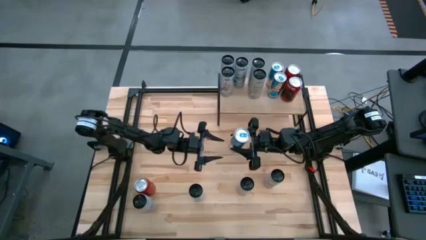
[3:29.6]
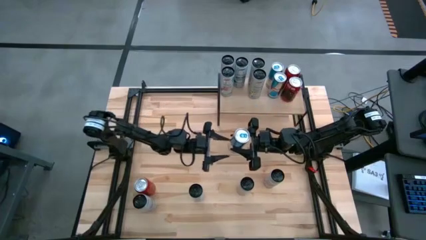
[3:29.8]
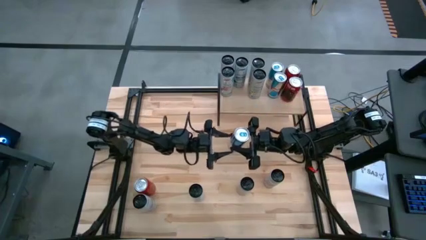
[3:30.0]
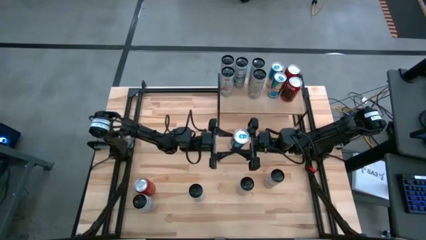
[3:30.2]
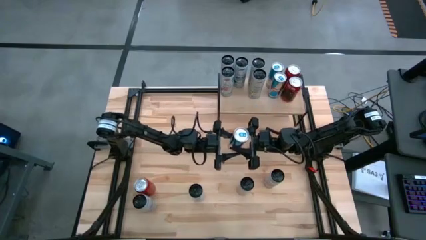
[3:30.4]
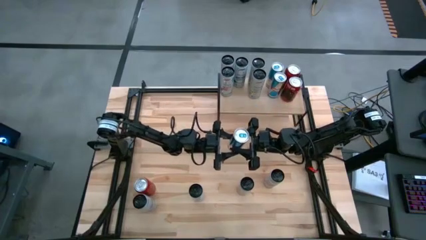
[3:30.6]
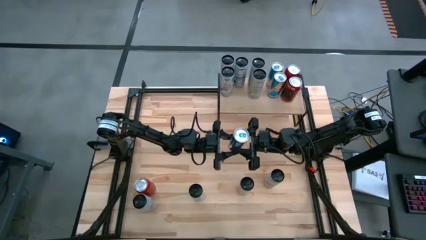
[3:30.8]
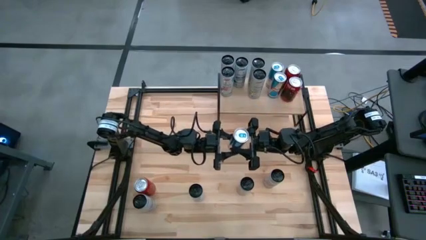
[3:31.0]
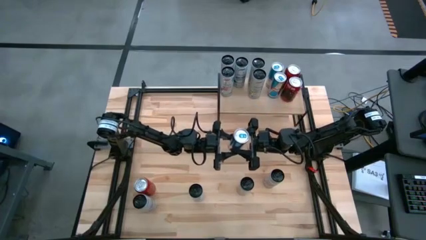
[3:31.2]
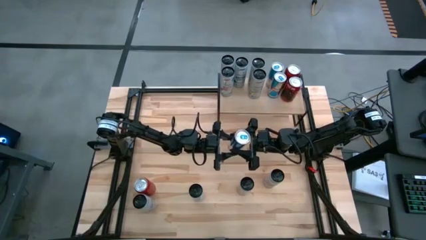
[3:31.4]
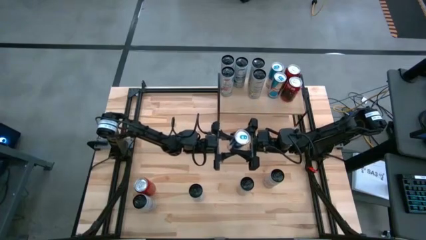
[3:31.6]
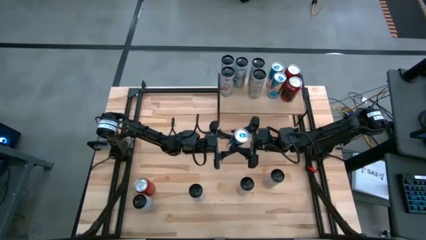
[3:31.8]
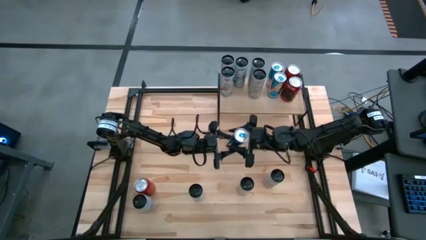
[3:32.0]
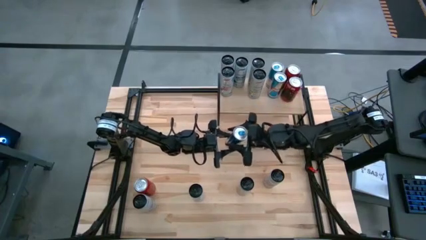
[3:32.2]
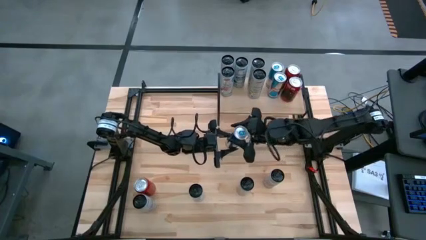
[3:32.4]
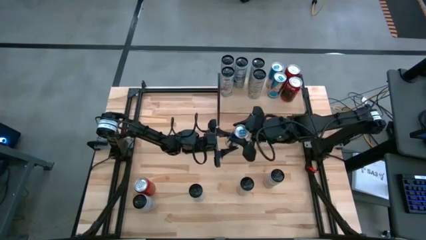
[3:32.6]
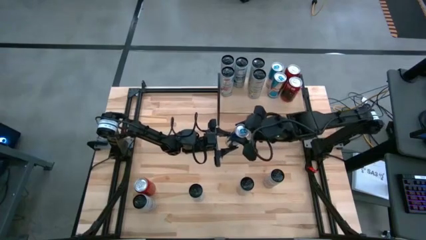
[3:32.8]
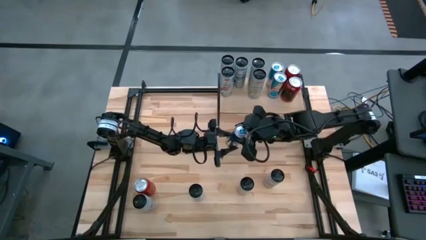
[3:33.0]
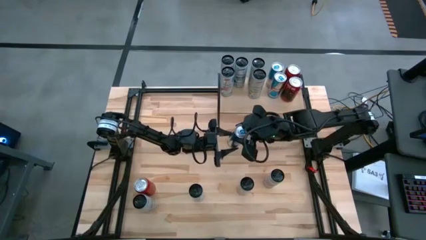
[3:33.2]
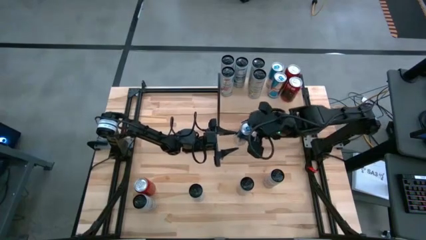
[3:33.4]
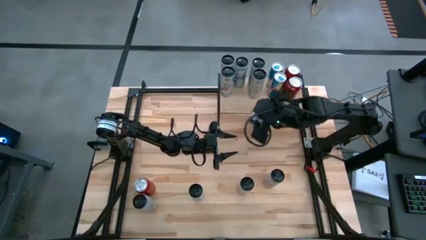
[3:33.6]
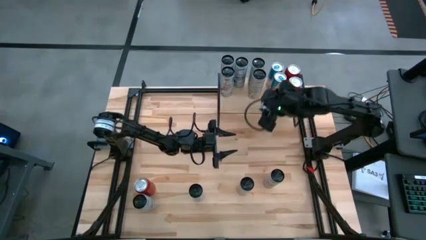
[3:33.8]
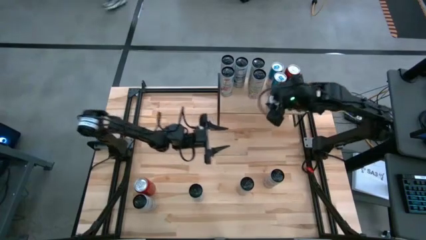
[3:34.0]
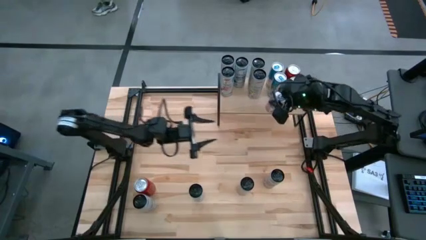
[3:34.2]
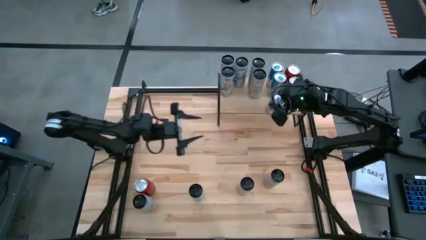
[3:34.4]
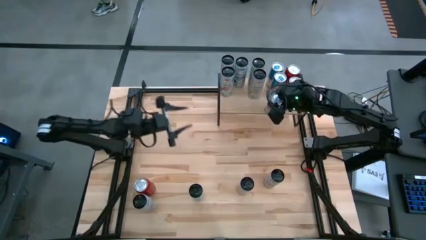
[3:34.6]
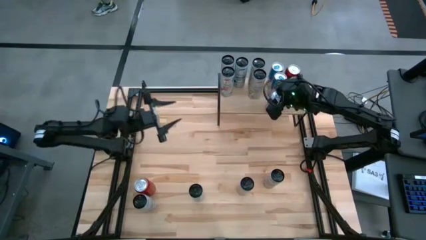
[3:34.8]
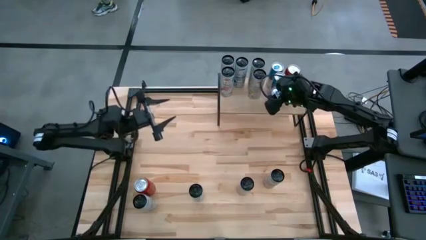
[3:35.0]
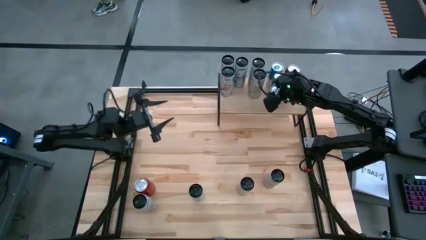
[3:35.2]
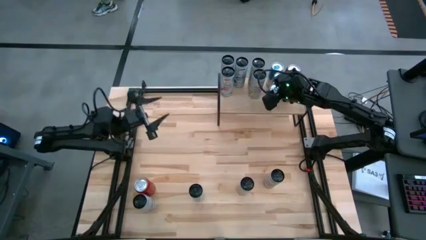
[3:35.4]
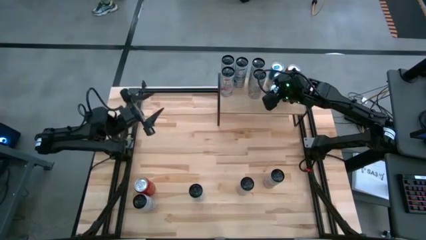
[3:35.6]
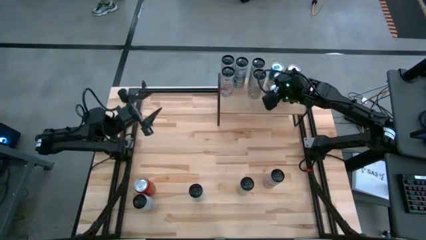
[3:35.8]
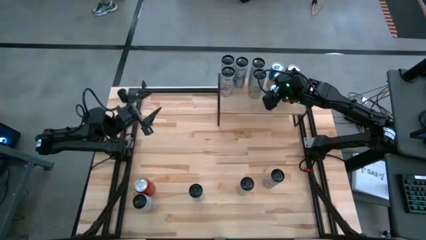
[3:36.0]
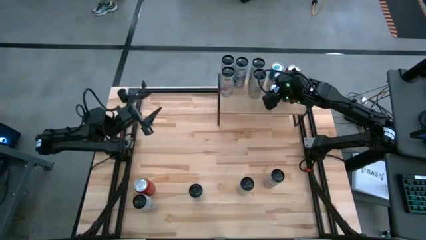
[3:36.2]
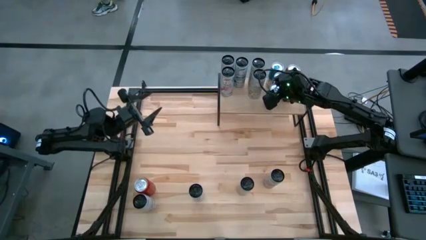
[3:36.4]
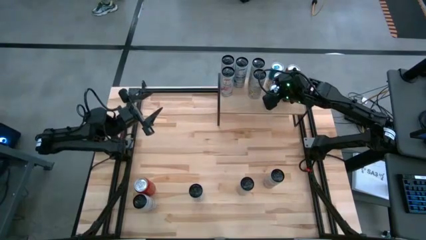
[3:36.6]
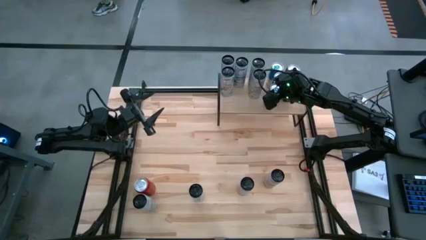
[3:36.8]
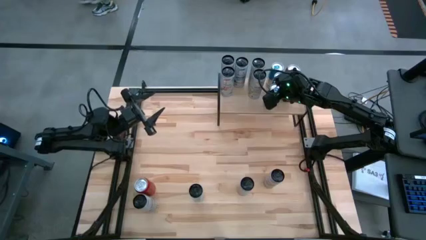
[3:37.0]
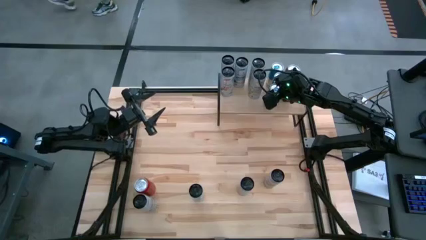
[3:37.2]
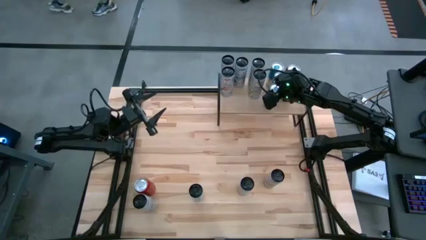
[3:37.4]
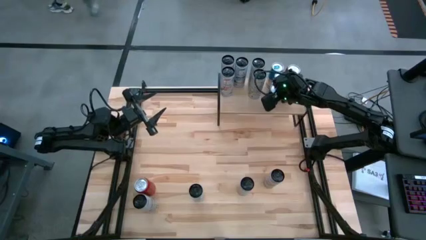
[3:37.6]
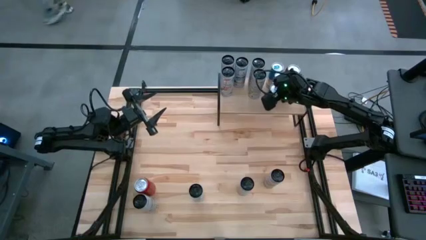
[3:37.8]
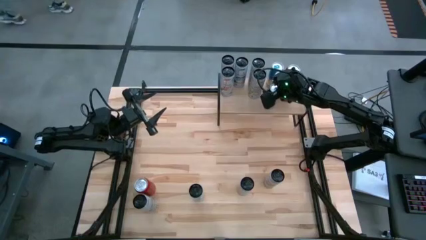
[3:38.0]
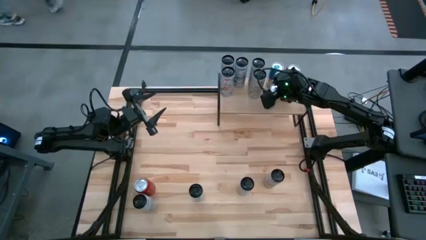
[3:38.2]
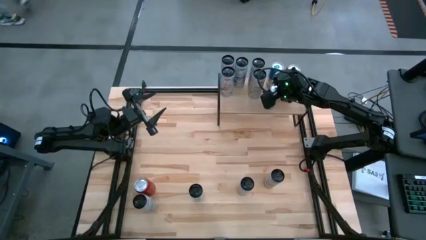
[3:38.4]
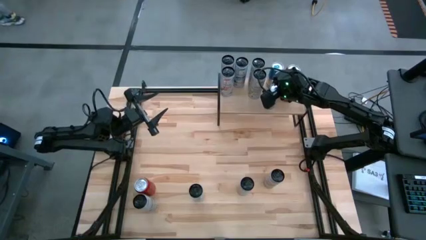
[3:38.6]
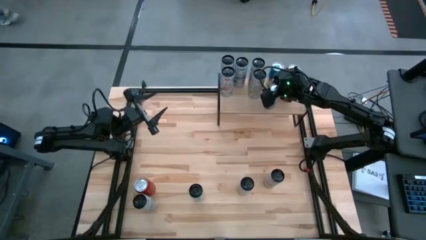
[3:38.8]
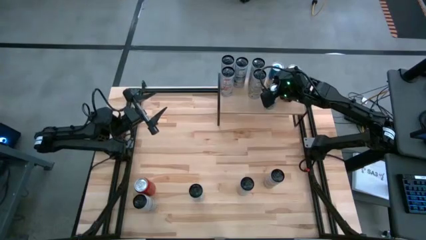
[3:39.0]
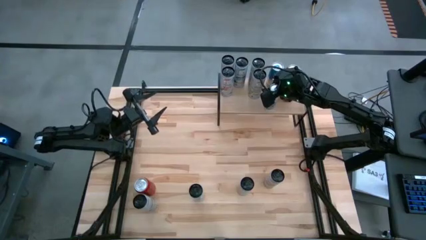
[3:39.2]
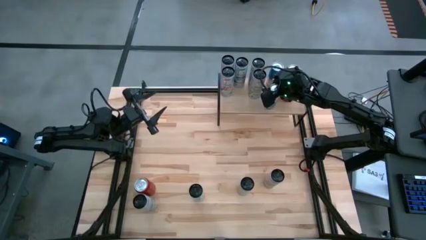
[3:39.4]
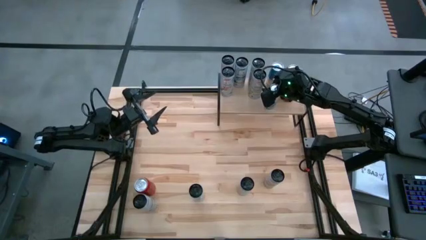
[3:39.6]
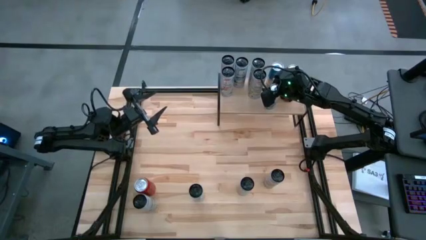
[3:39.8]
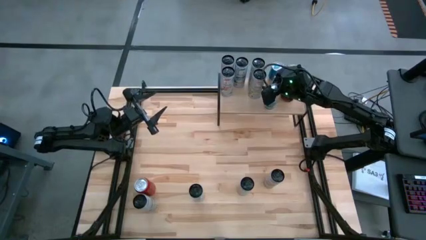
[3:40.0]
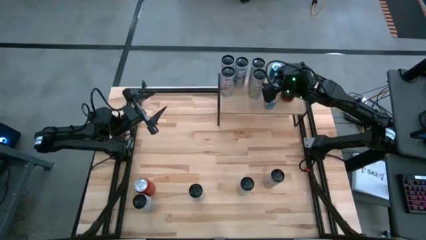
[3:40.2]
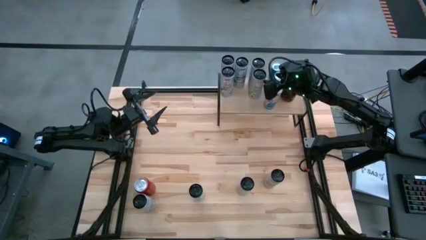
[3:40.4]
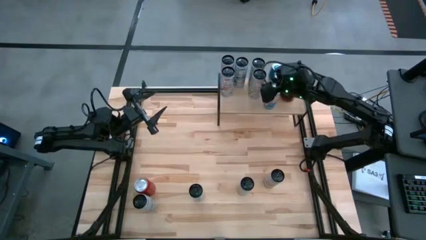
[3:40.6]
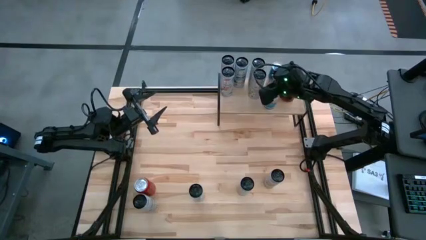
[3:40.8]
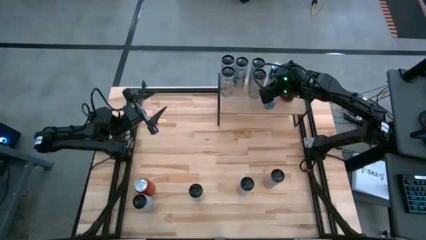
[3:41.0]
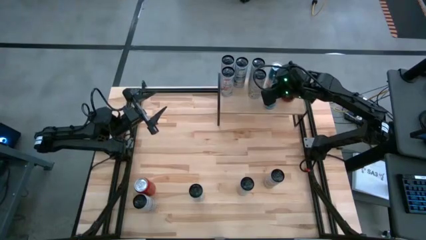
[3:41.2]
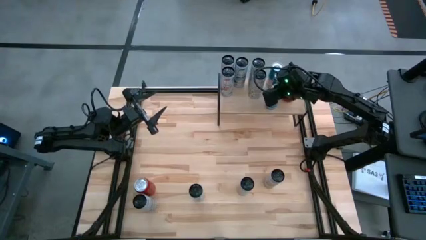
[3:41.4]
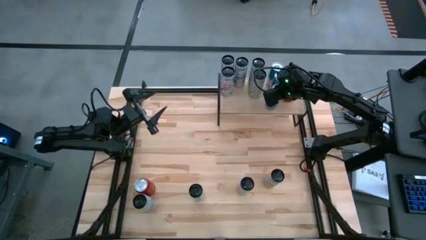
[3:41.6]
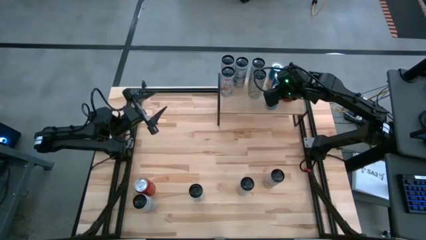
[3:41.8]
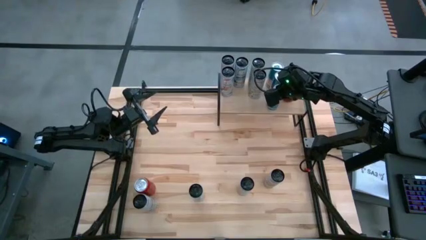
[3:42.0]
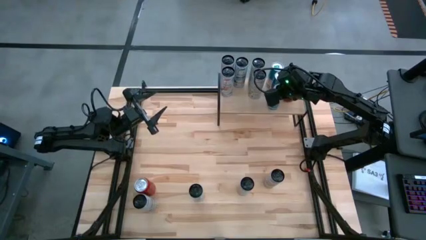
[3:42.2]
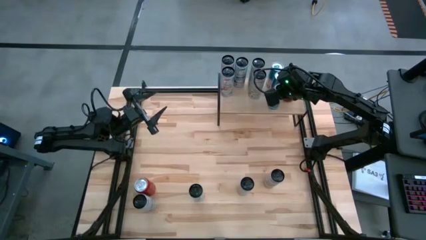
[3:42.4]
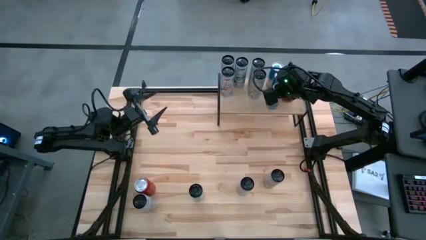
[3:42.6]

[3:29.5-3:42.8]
Task: Place canned beverage on shelf
Put the blue soda can on the shelf aligned with the other blue soda cans

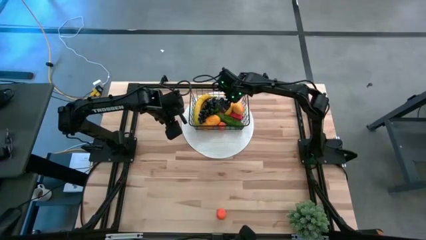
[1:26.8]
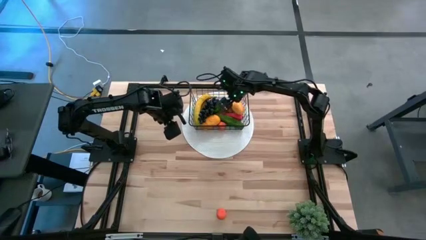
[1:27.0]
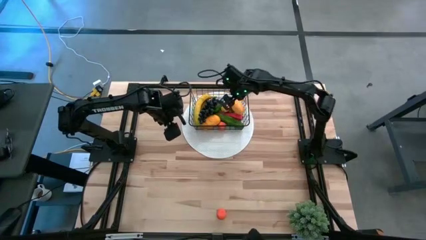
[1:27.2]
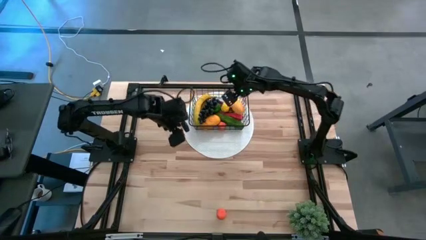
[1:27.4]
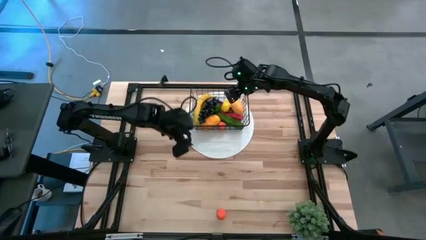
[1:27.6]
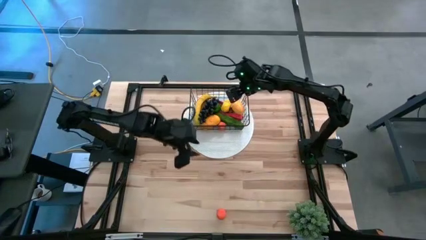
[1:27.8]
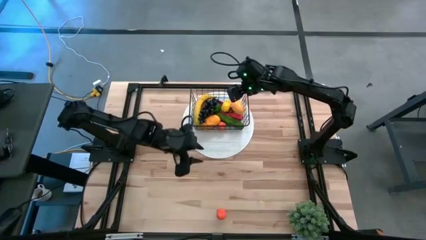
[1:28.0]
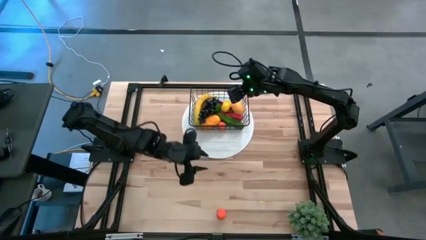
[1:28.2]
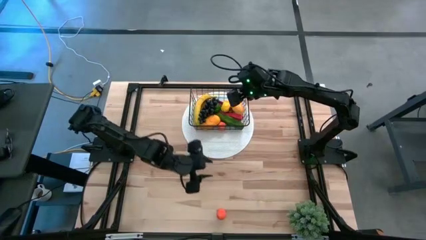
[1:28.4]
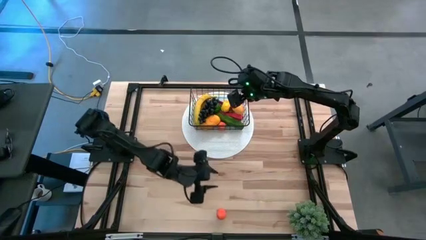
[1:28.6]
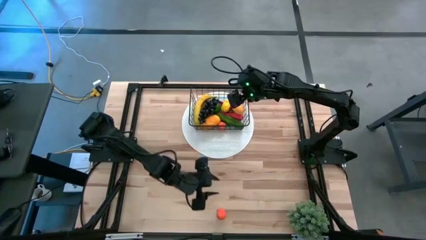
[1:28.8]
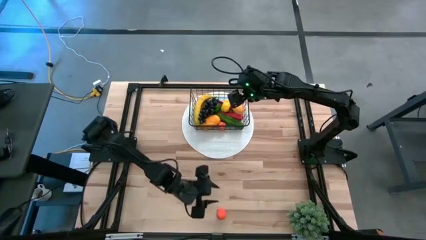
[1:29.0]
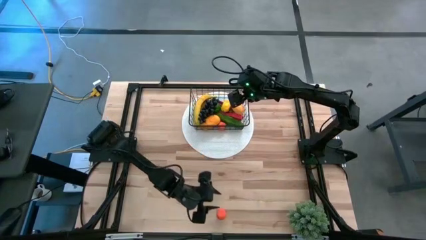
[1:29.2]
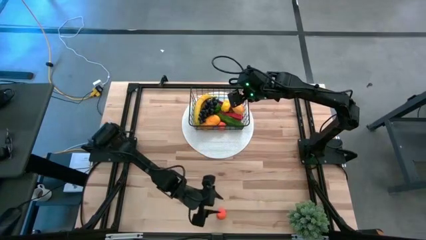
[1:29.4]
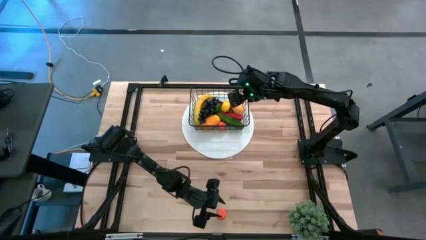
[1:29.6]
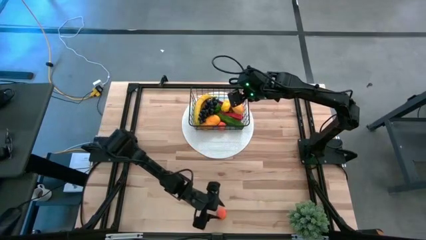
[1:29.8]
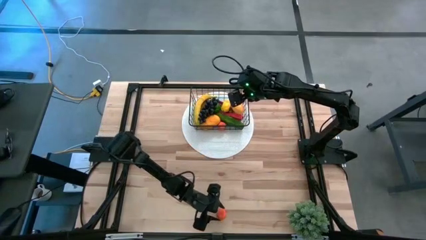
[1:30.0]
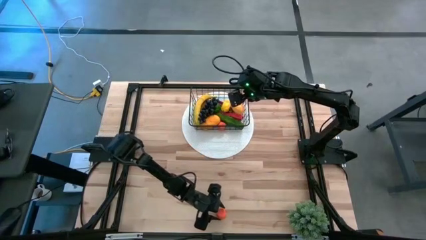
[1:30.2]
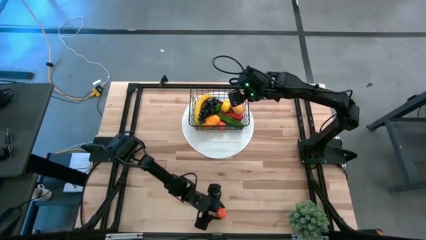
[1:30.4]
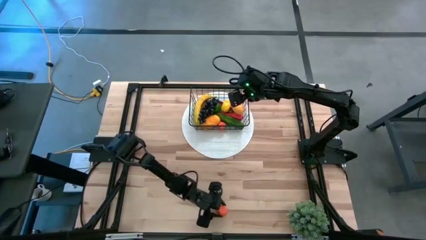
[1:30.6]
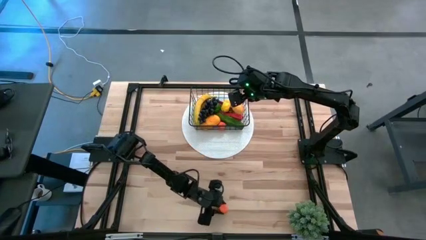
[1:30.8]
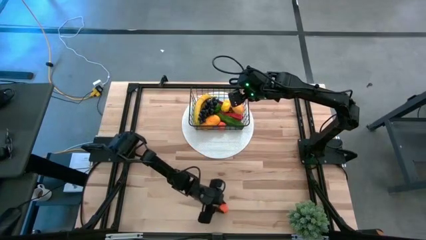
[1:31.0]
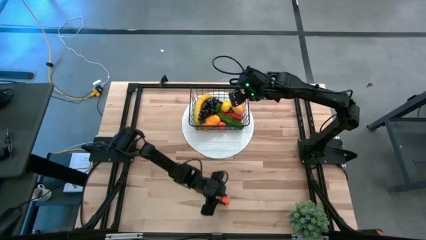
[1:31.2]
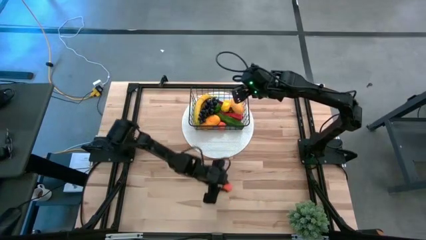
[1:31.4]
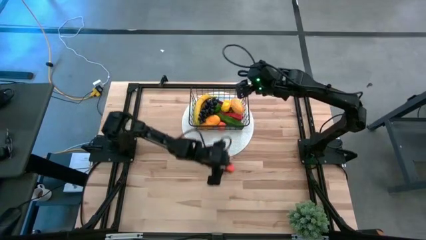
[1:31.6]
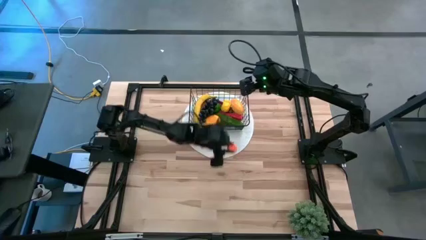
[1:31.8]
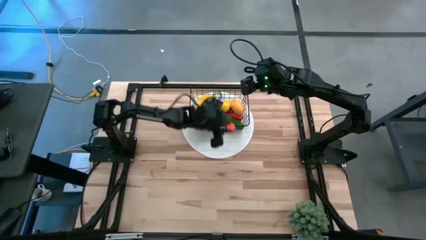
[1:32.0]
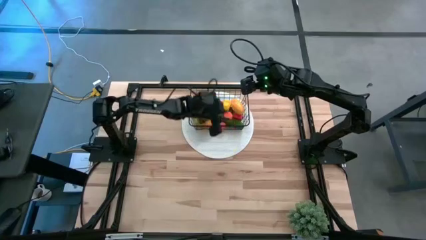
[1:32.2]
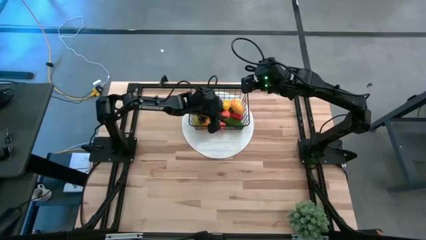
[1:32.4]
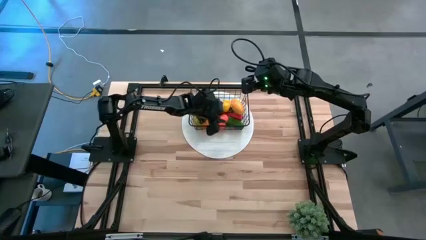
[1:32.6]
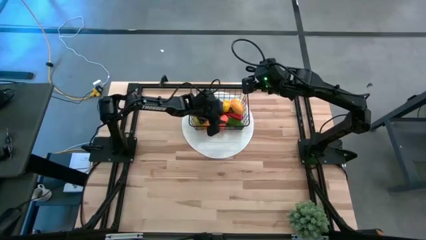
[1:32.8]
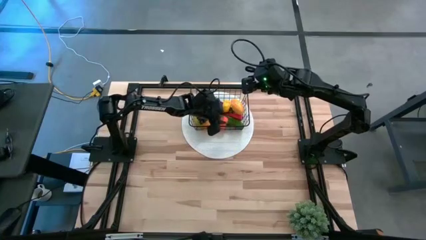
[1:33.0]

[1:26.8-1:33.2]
Task: Build produce basket
Put the orange into the black wire basket
